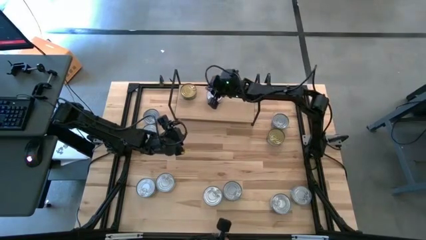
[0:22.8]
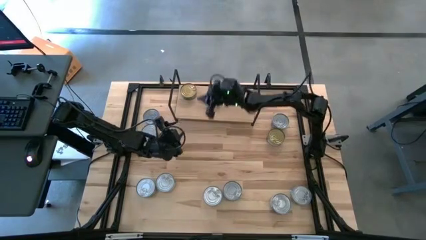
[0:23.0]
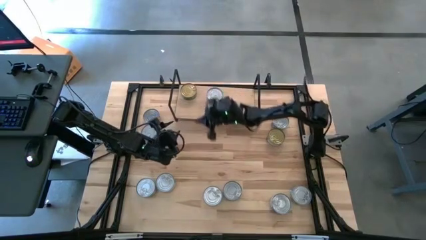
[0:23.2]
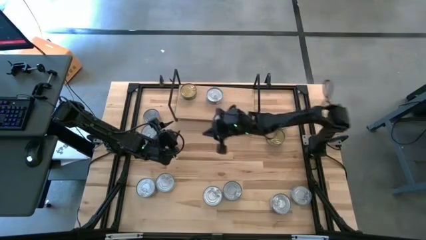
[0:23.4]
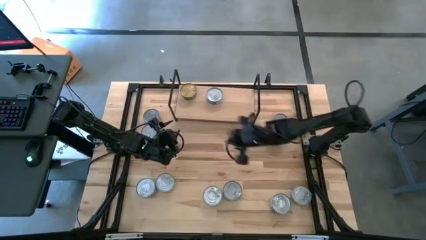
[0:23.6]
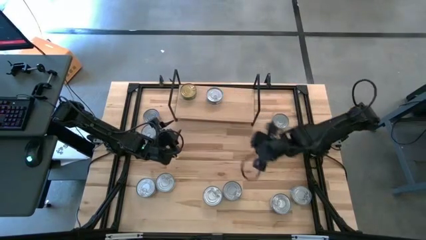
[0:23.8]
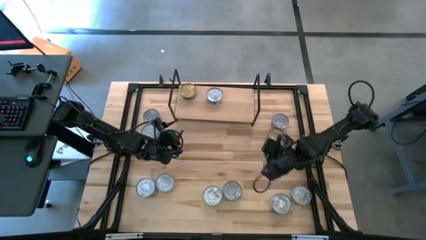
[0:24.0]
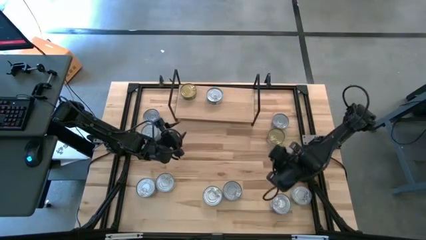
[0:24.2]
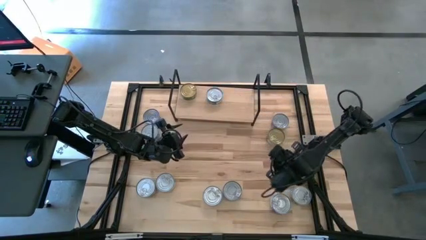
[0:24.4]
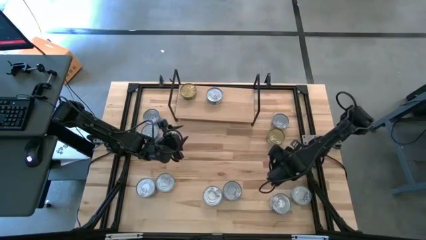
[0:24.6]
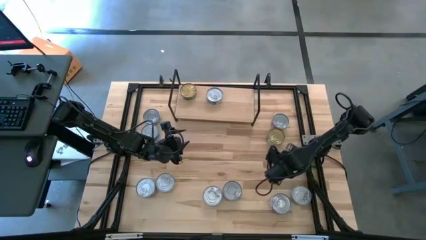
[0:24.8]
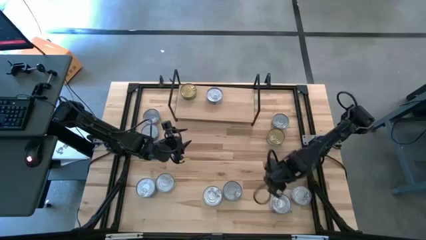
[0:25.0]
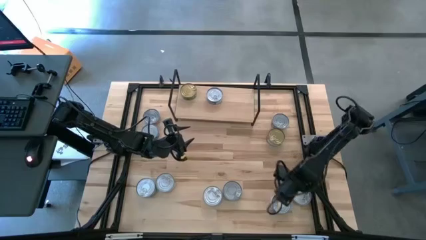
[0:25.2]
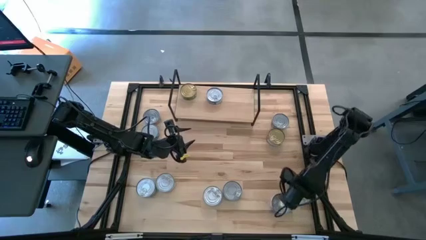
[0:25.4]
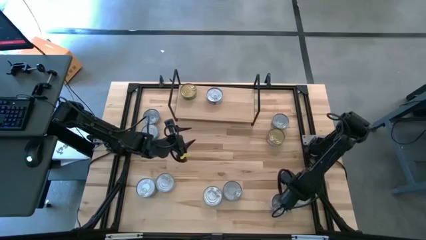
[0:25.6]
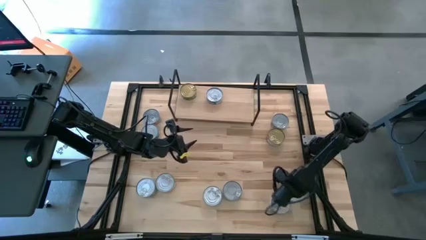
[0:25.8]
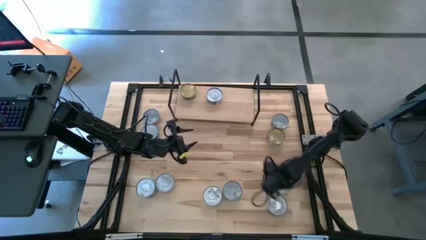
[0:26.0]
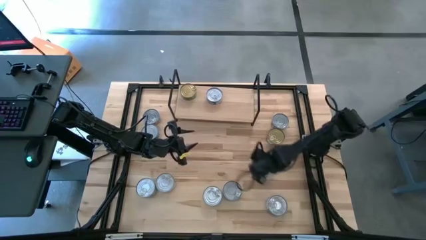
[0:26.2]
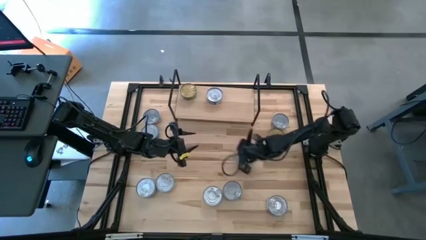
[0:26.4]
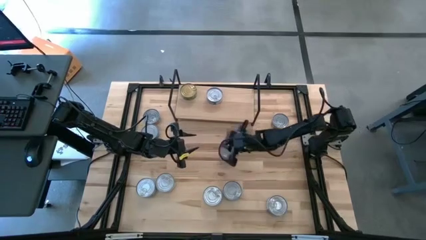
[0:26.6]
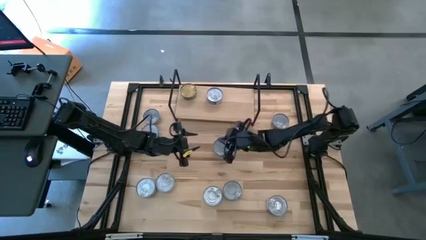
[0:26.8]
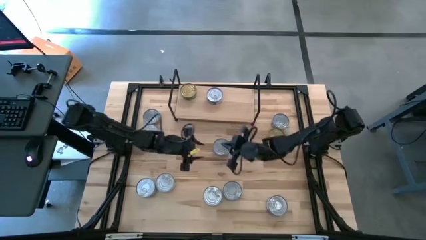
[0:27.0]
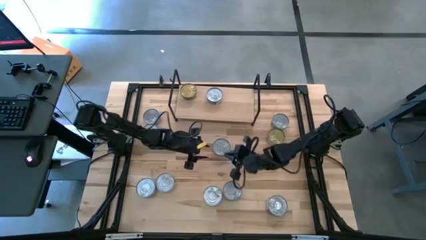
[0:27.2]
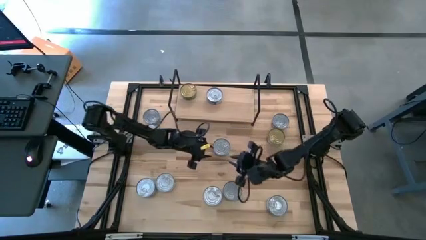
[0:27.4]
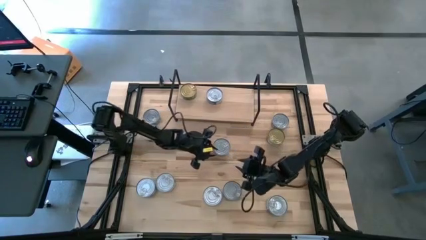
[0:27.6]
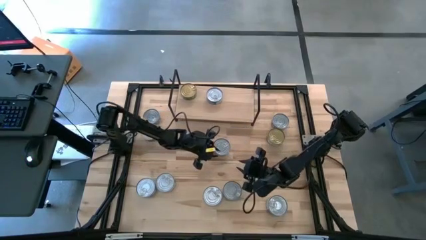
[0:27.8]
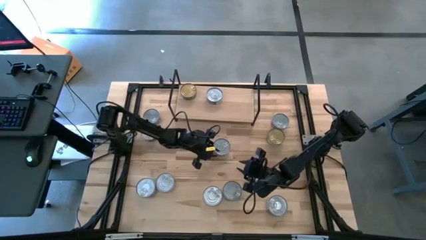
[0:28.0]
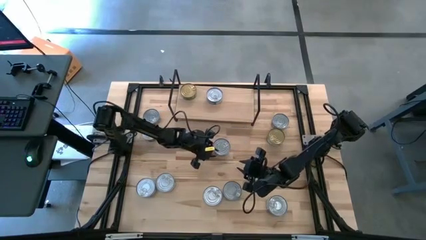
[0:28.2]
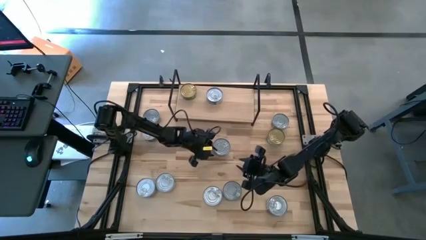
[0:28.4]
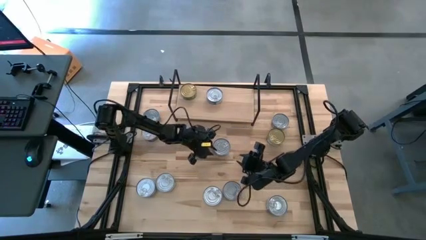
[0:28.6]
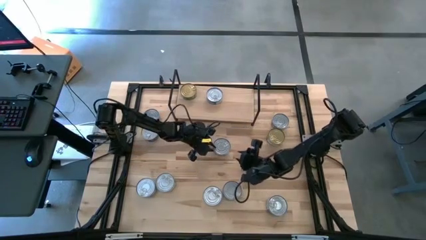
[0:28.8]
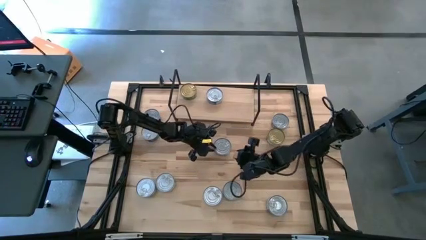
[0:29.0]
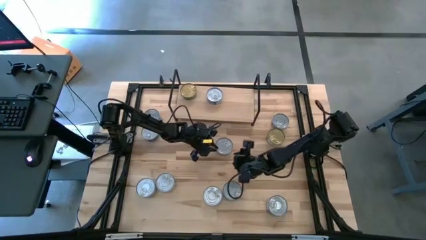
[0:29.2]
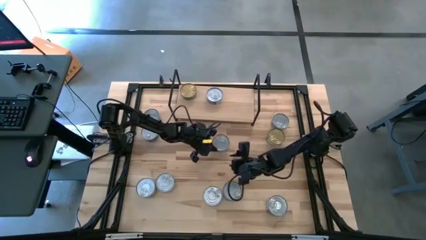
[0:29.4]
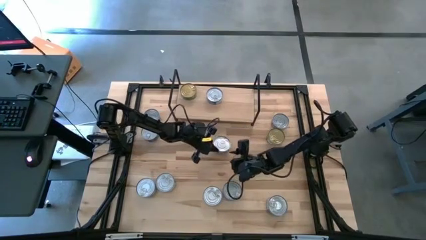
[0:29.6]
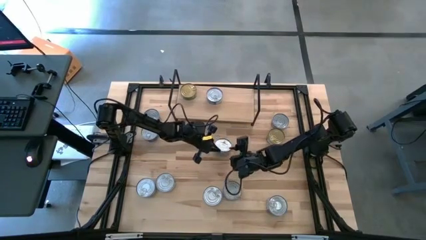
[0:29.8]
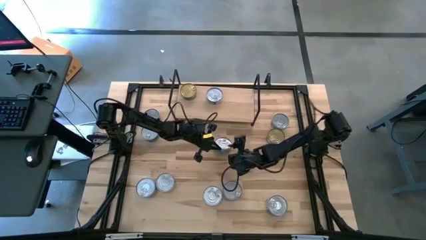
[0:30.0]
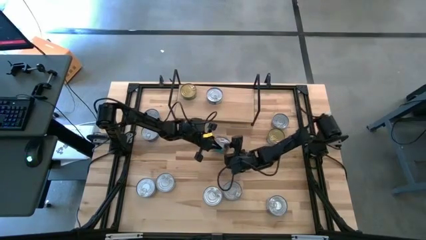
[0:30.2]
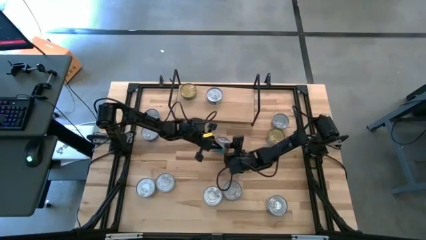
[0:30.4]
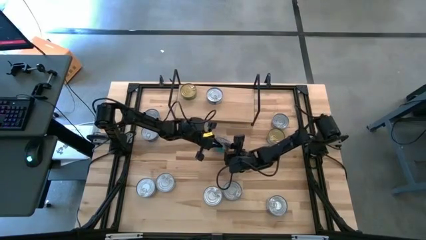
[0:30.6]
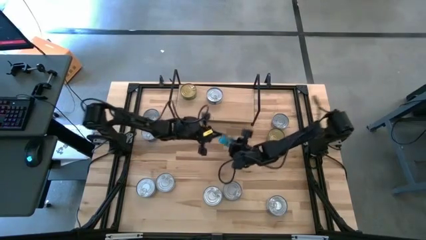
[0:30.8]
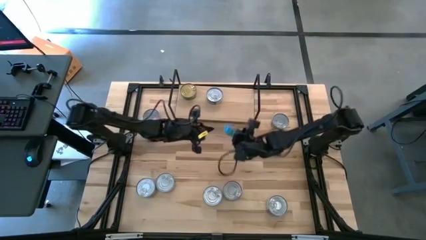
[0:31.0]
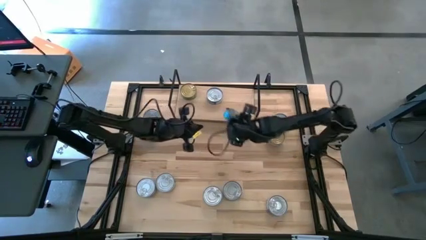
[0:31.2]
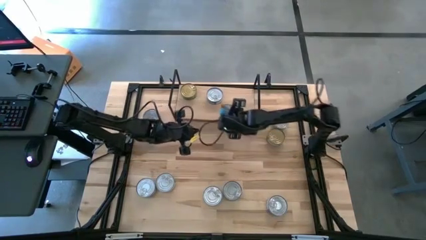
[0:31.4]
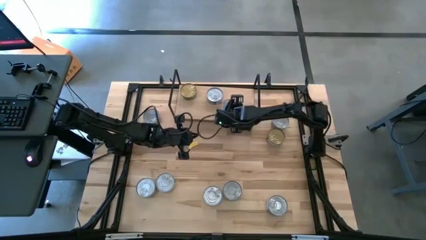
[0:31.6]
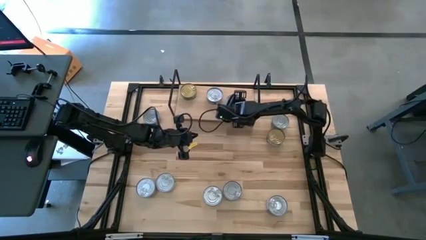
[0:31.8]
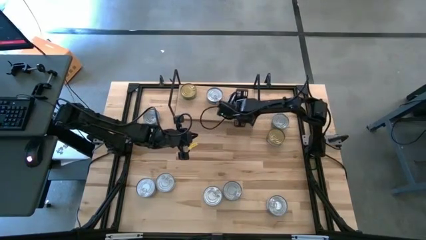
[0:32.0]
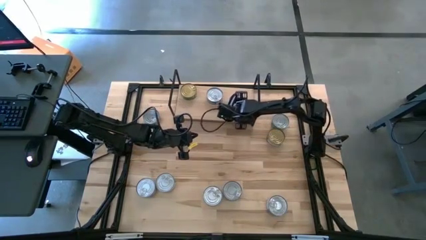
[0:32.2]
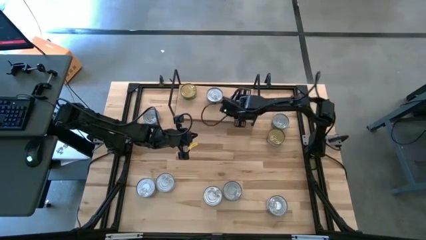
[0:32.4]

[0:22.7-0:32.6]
Task: Stack canned seafood by type on shelf
Put the yellow blue tuna can on the shelf

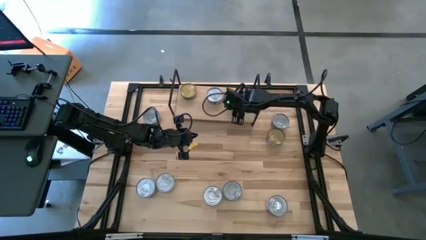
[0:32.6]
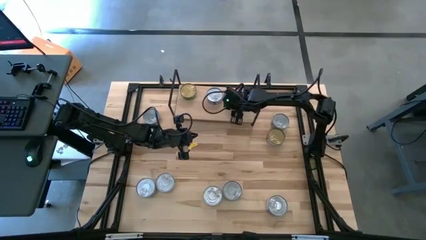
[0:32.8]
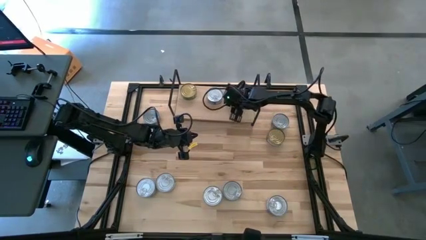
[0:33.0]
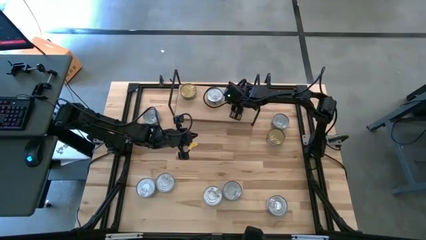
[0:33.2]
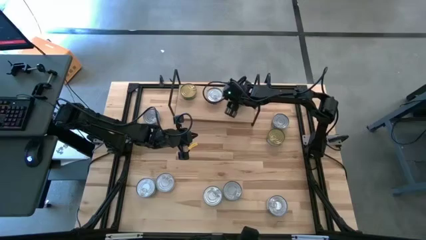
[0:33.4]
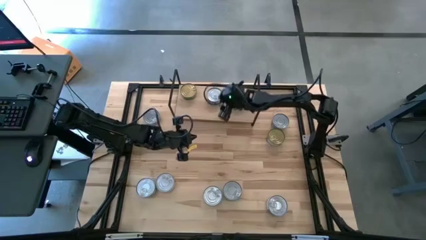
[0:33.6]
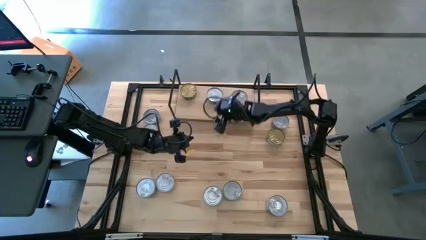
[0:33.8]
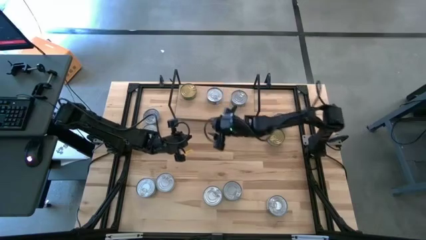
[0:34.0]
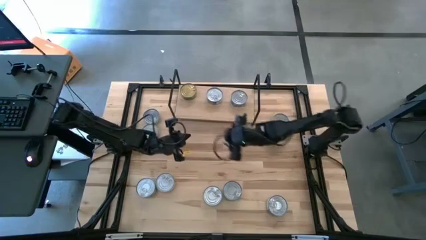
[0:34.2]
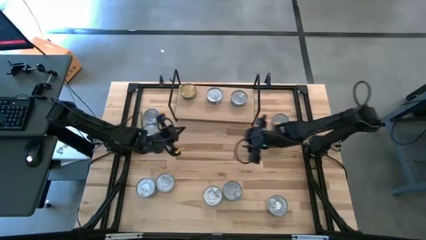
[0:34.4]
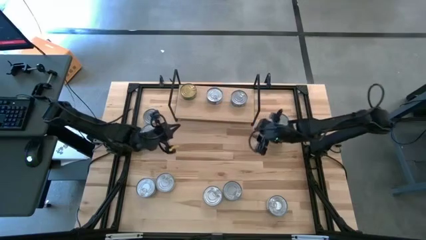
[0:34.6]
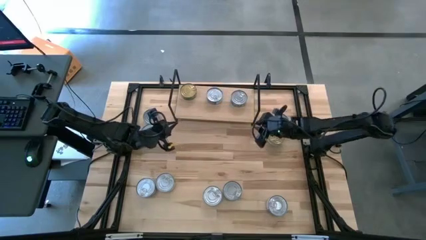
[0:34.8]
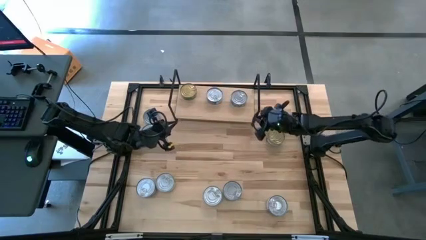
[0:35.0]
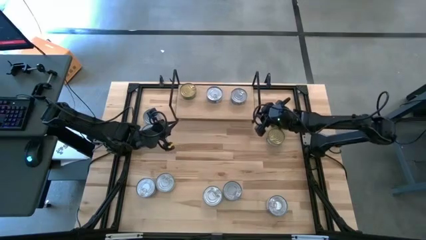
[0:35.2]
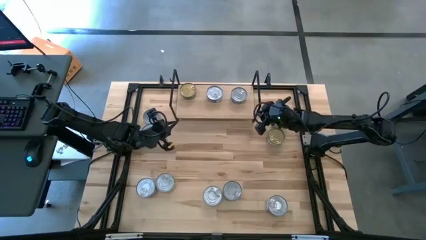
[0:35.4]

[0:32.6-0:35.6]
Adjust the shelf

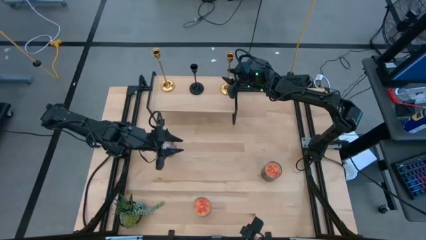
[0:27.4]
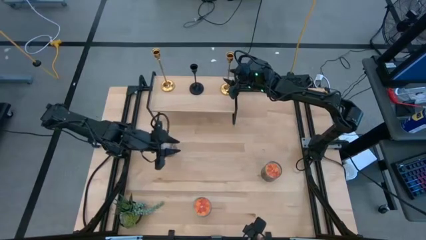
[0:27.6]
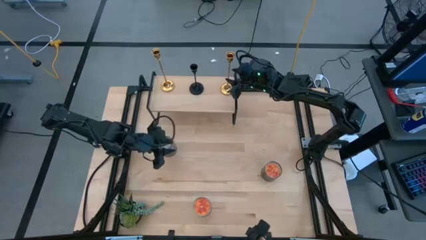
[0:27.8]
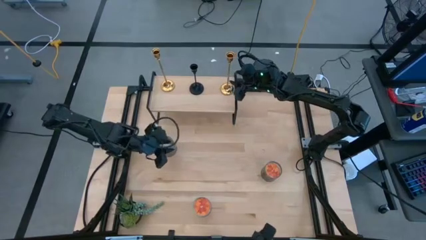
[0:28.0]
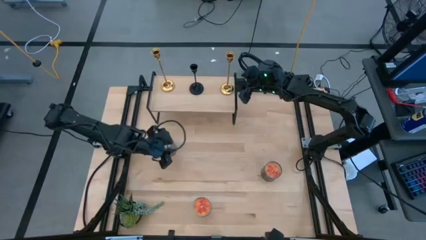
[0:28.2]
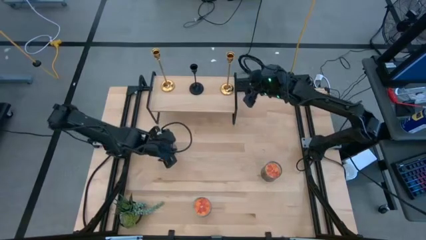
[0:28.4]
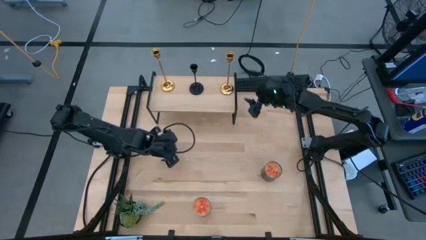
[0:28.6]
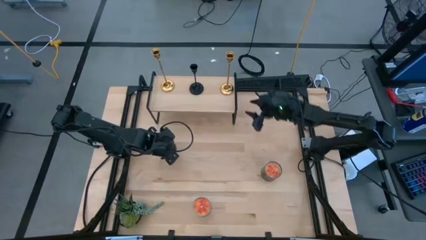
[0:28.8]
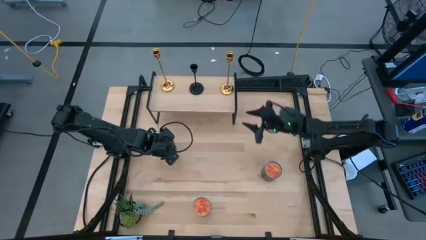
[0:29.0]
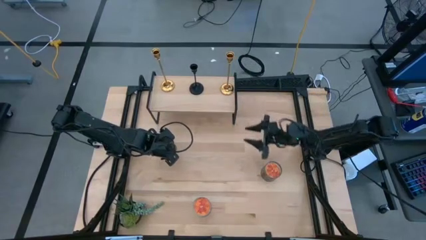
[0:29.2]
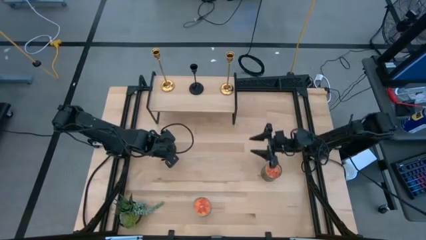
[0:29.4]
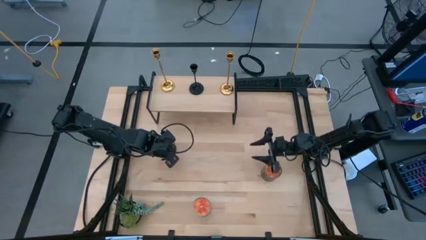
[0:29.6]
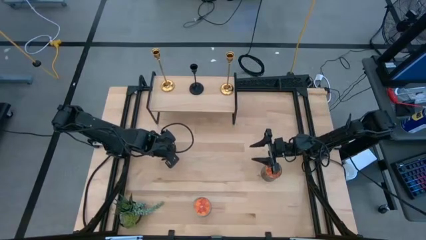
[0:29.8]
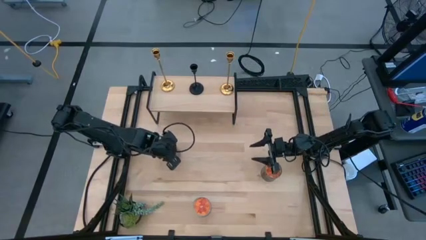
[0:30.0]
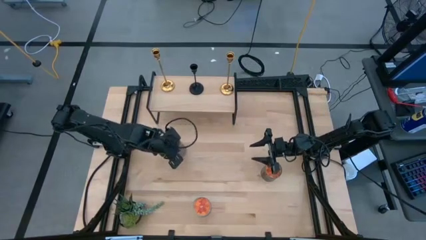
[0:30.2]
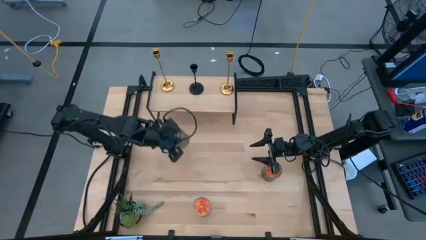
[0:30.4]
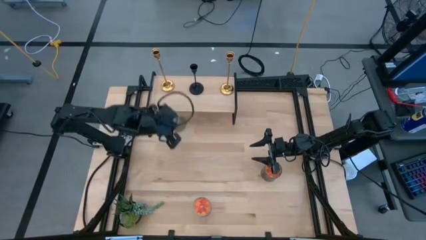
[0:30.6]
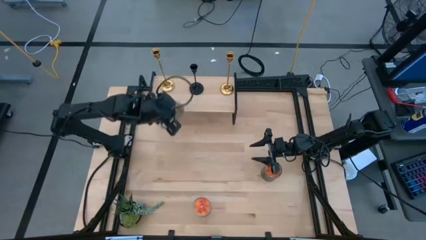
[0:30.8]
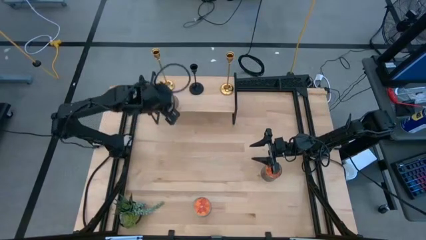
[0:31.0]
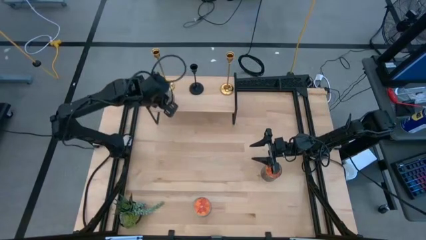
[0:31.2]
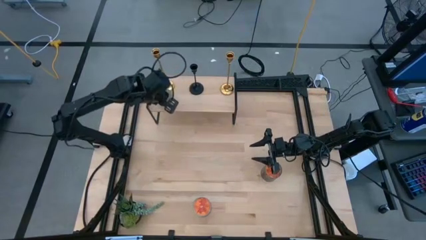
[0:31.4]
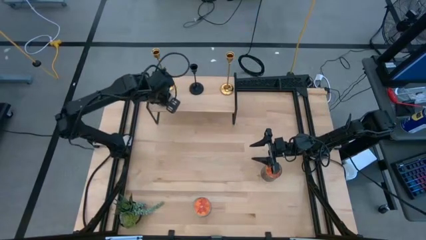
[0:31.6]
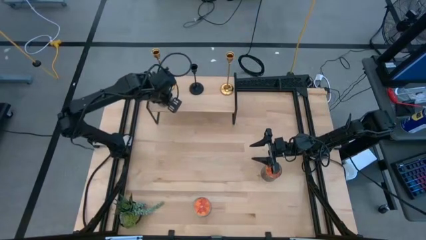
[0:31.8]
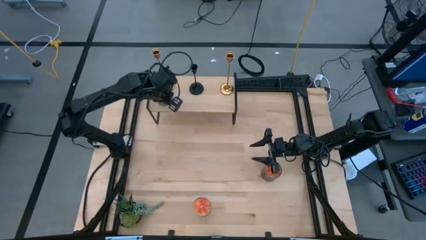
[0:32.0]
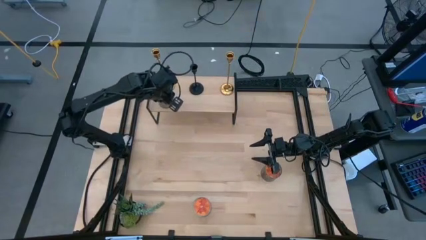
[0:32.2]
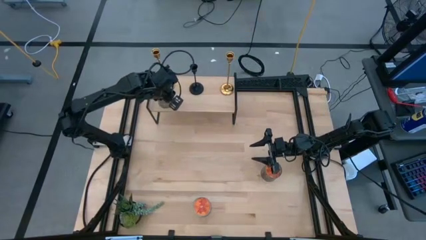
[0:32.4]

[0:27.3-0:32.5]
Task: Pick & Place candle stick holders
Put the silver scented candle on the shelf
